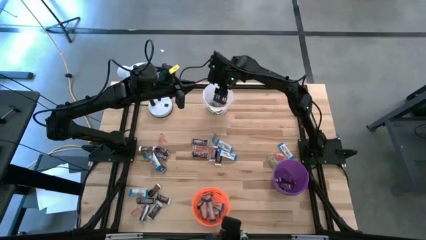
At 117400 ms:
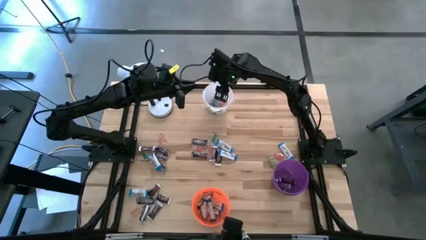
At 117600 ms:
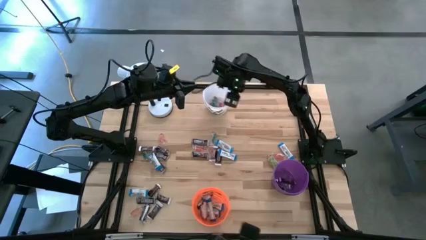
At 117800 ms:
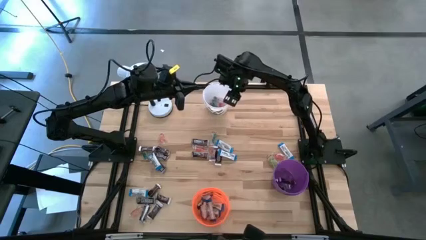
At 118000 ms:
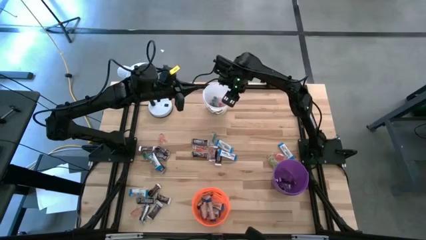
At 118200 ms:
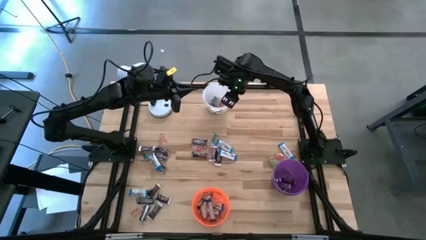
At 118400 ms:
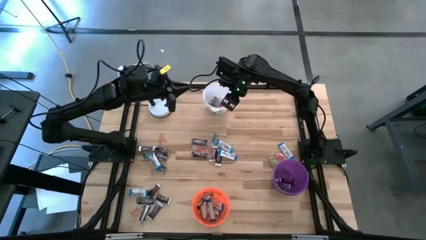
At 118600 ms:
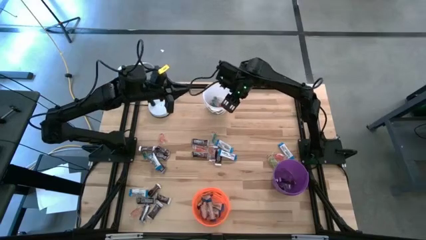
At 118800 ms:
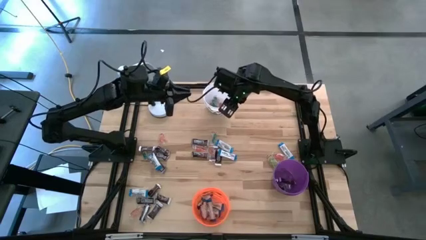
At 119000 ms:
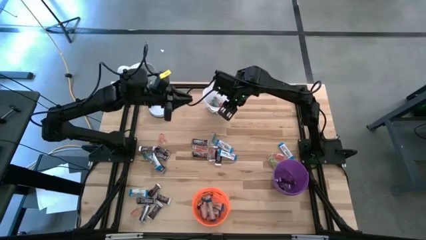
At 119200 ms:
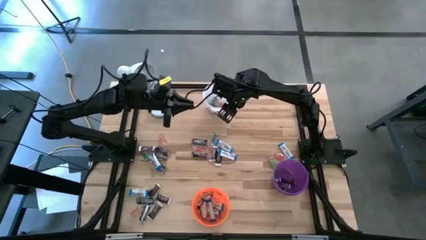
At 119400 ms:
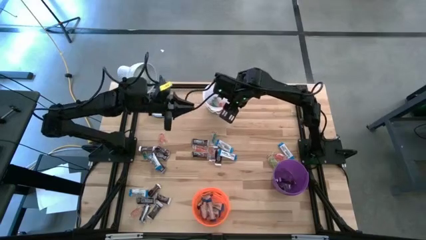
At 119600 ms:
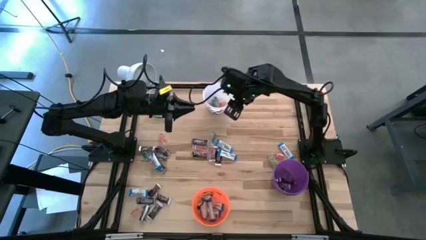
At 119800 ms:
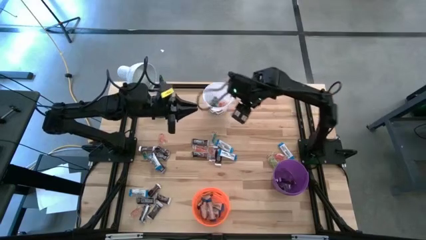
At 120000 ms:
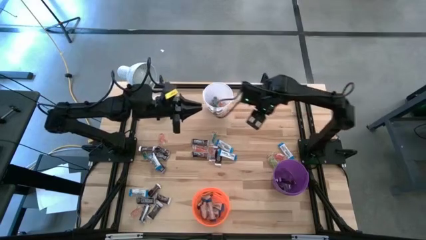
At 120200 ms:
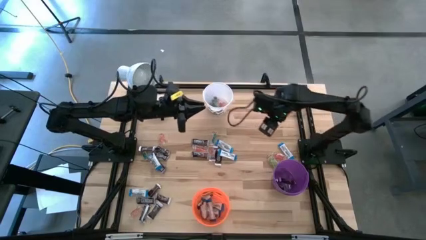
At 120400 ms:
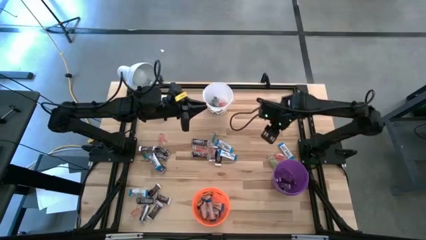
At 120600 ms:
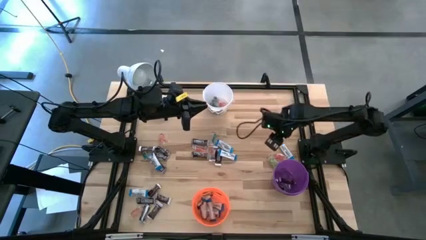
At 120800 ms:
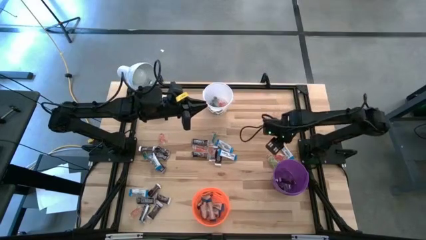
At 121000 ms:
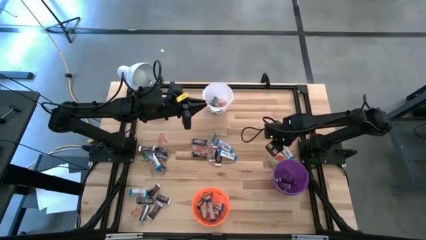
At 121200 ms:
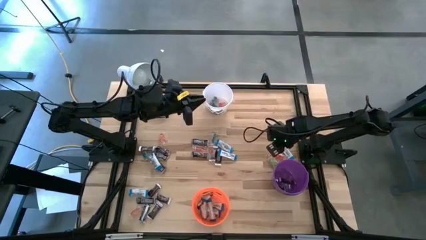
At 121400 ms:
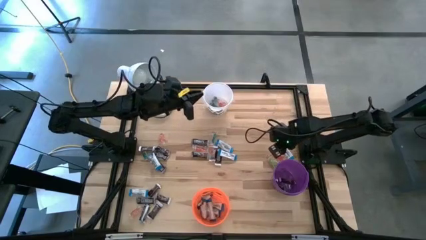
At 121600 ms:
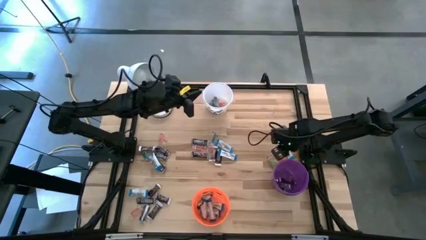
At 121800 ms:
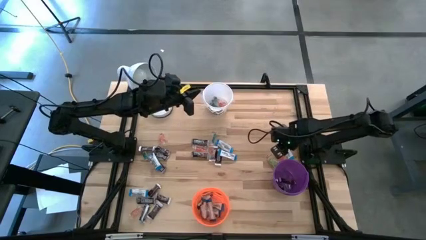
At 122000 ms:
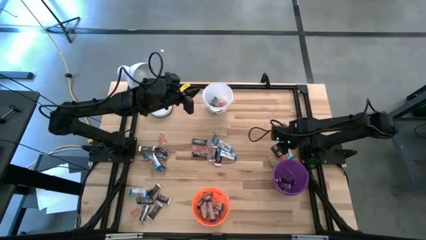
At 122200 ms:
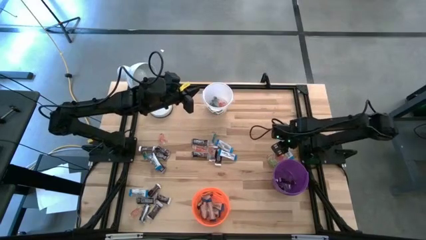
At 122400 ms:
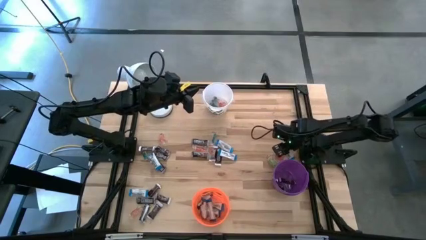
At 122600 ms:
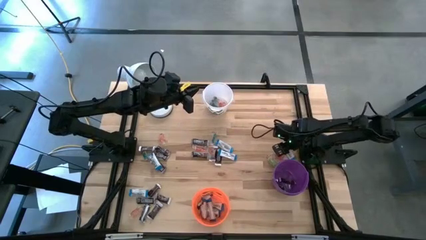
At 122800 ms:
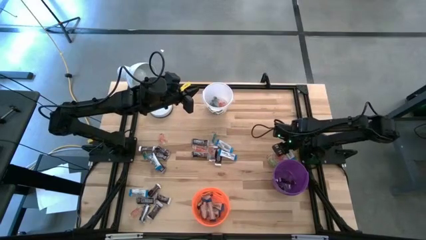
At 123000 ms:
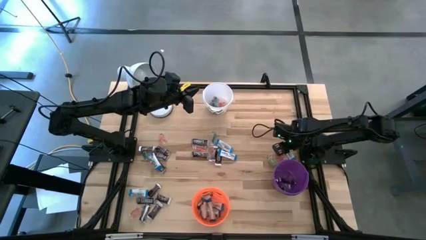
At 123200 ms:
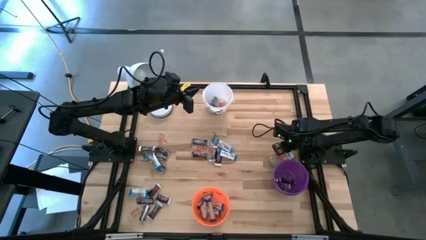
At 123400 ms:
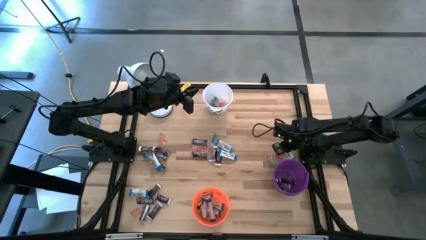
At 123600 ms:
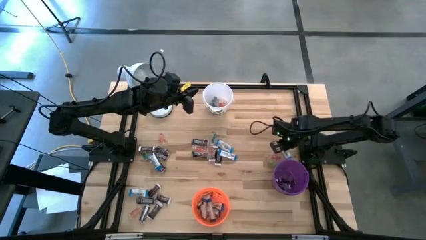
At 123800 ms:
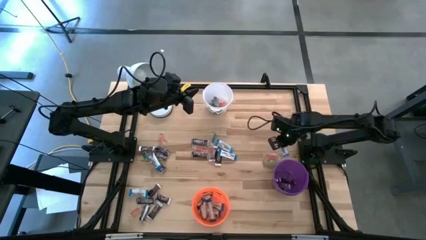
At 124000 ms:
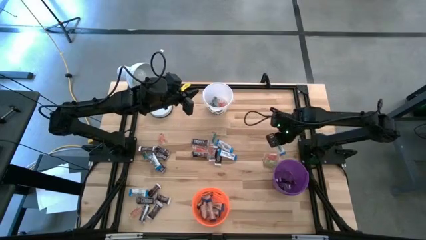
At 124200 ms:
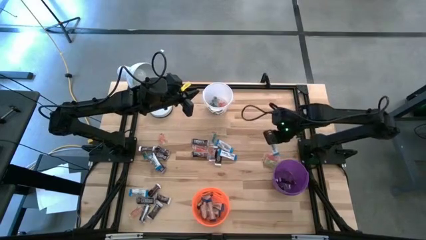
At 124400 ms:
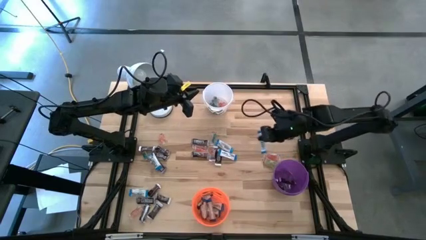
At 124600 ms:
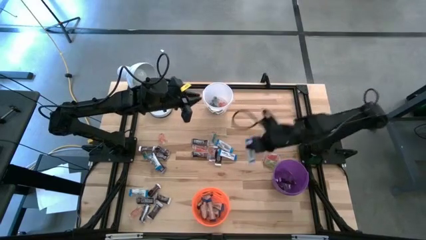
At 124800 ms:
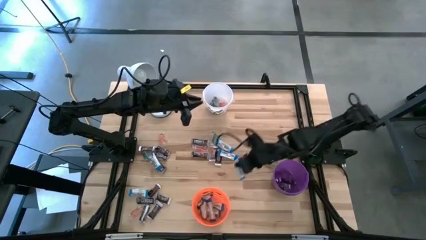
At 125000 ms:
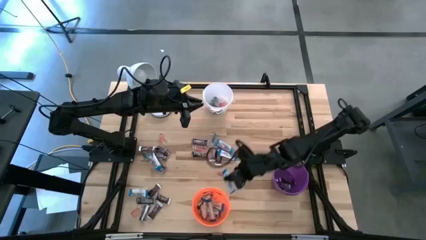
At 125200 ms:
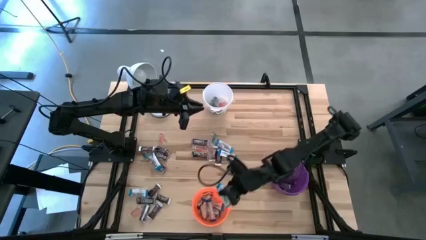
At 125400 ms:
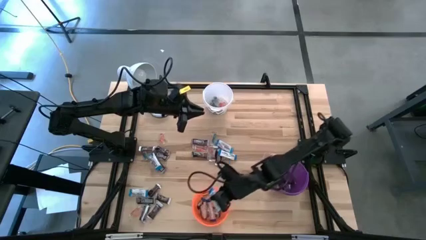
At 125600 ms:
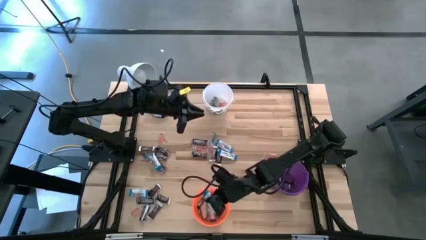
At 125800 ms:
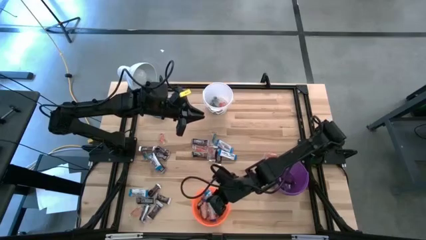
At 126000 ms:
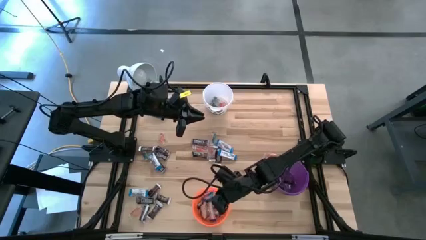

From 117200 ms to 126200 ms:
Task: Organize candy in baskets
Put the white chocolate bar into the orange bucket

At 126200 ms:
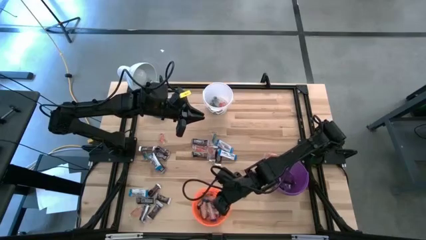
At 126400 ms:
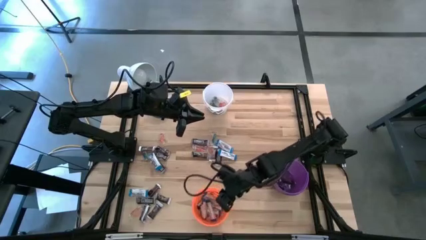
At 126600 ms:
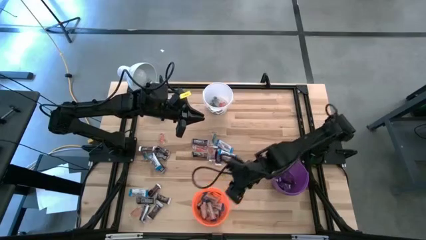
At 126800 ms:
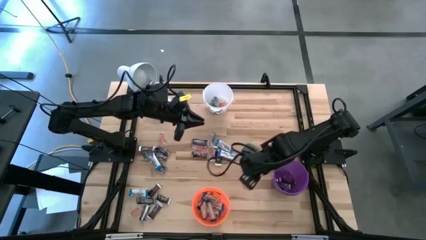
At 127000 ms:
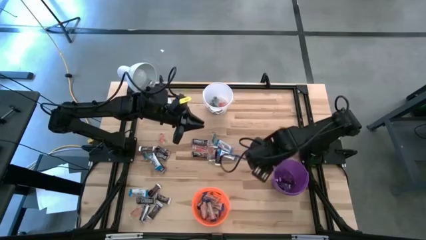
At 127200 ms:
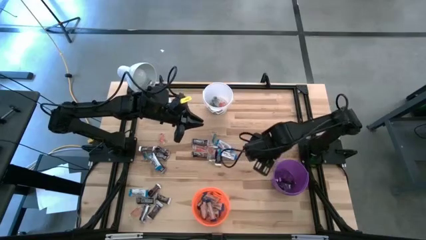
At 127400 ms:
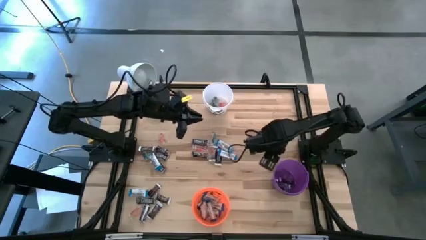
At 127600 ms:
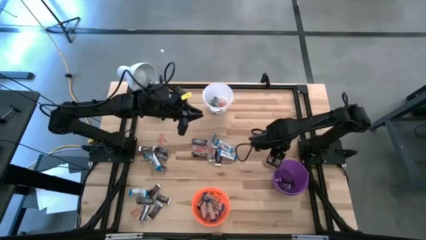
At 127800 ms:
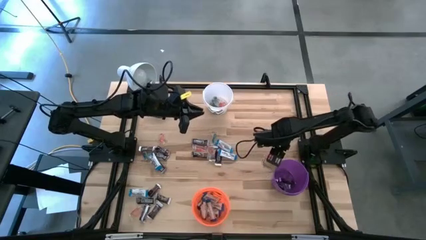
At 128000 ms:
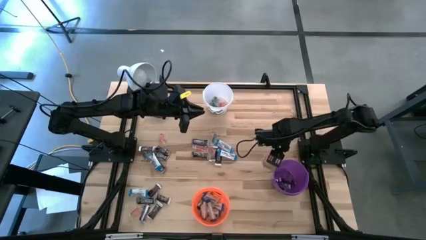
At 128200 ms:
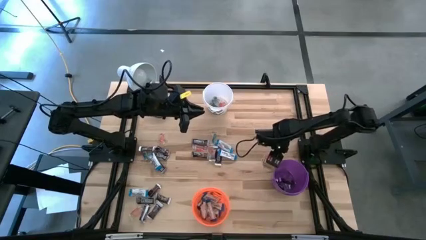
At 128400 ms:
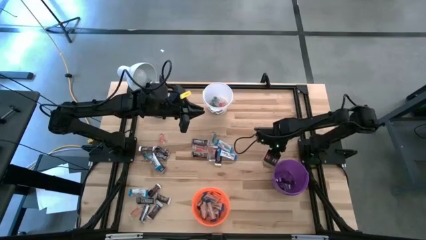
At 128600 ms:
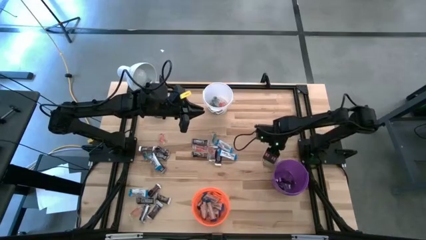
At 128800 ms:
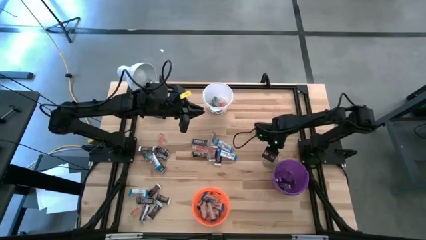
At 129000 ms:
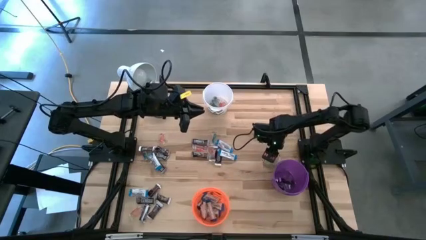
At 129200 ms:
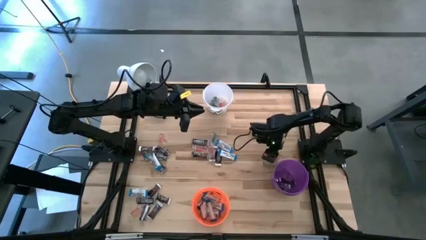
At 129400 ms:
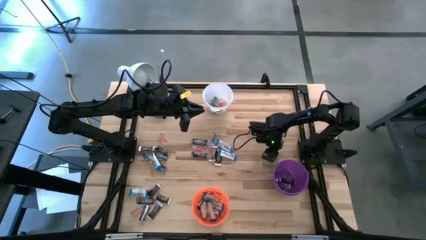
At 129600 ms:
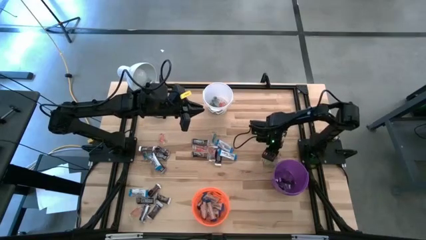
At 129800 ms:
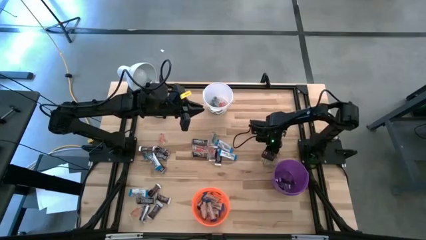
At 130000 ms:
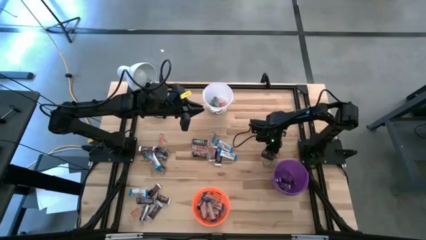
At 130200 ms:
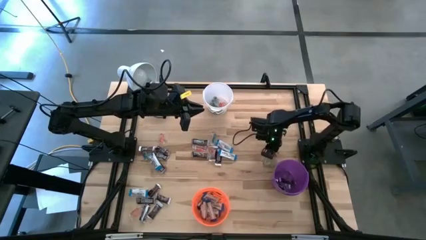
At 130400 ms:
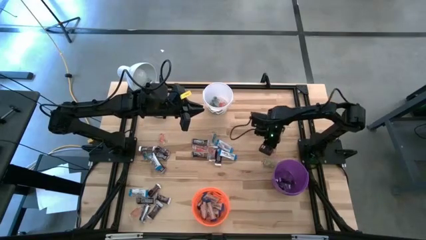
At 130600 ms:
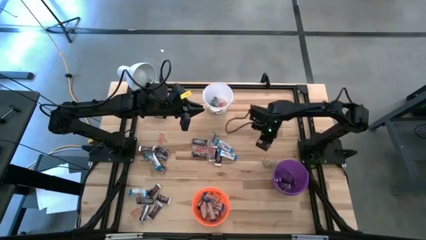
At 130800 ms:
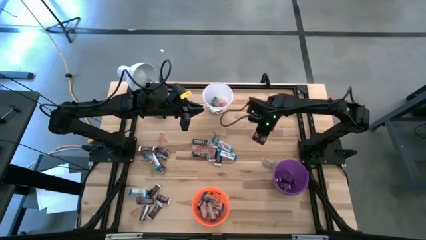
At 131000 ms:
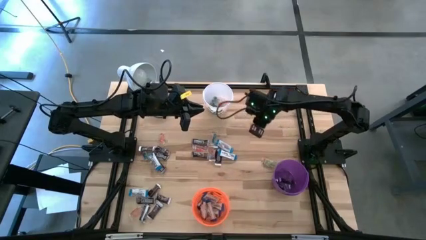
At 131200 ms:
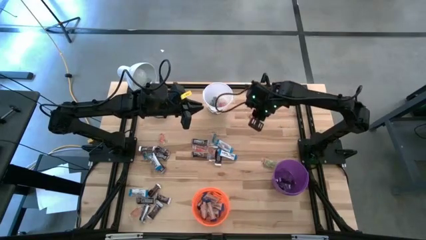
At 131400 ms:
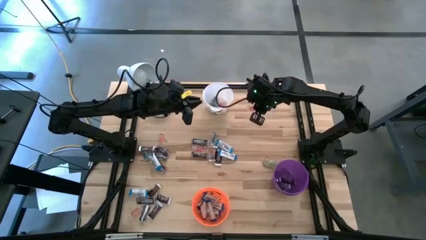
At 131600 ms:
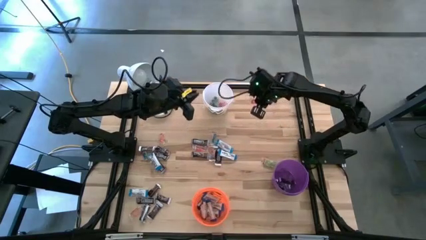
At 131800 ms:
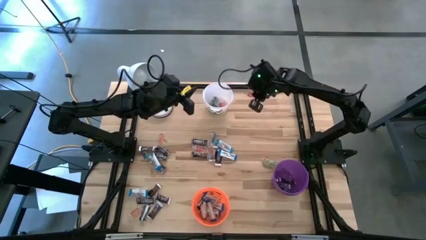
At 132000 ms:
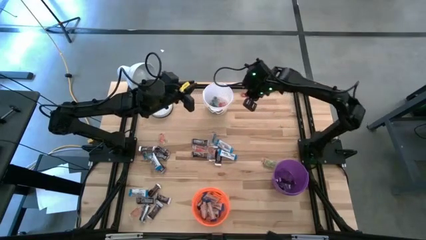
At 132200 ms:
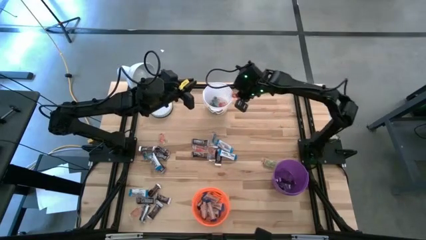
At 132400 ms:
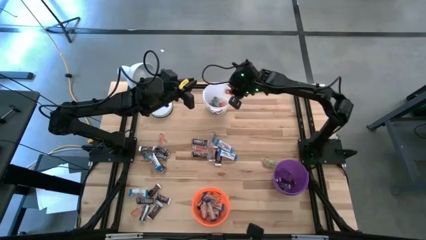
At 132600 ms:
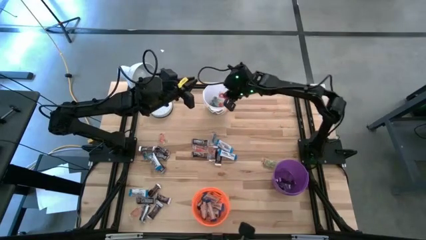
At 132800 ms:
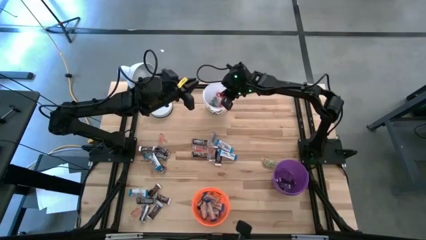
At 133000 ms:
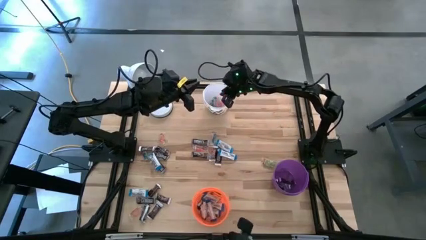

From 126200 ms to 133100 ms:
Put the red gummy into the white bucket
